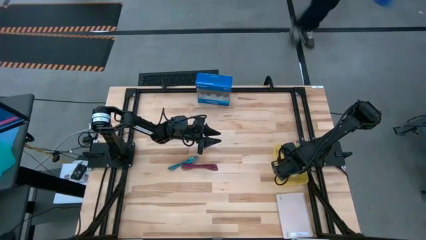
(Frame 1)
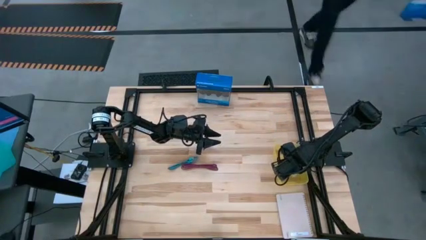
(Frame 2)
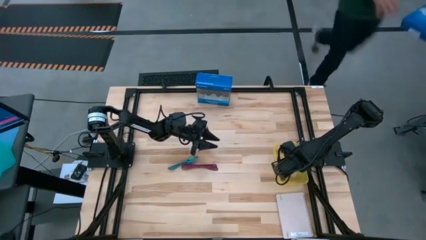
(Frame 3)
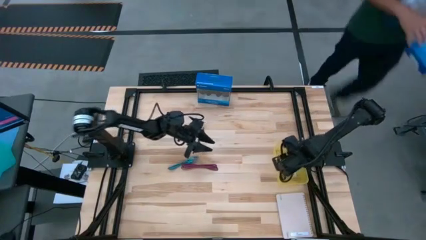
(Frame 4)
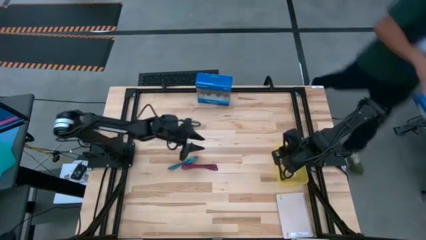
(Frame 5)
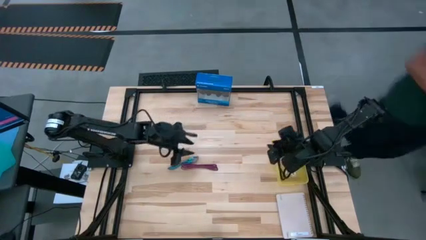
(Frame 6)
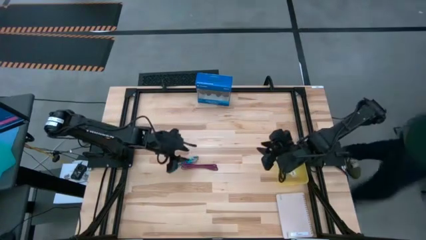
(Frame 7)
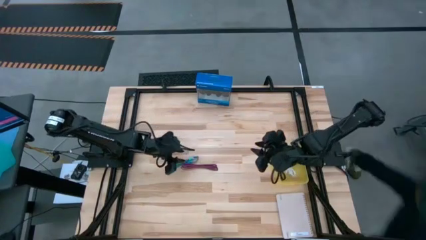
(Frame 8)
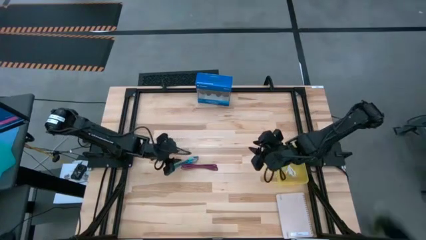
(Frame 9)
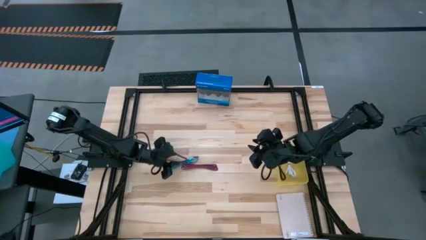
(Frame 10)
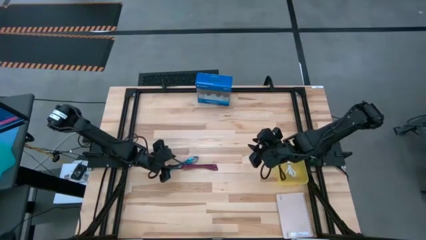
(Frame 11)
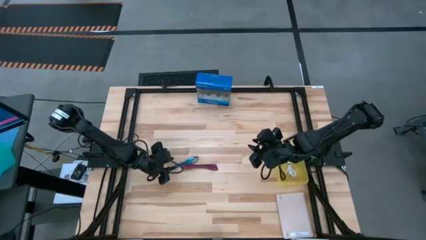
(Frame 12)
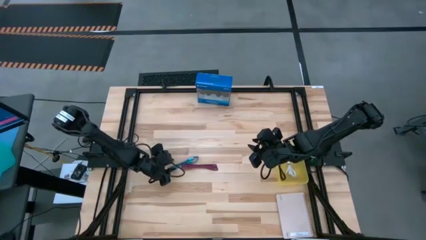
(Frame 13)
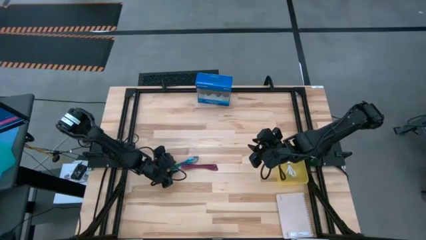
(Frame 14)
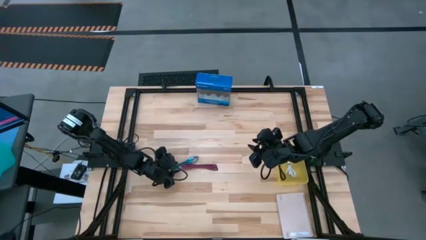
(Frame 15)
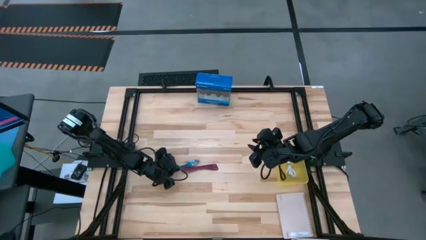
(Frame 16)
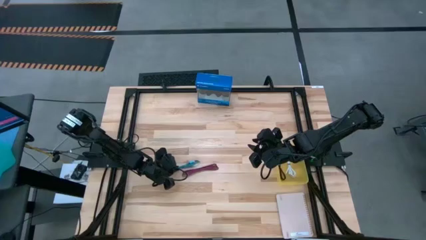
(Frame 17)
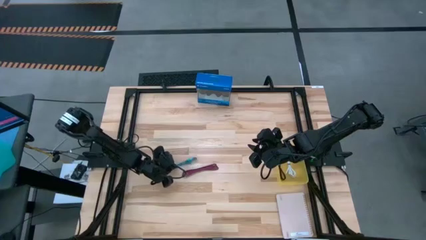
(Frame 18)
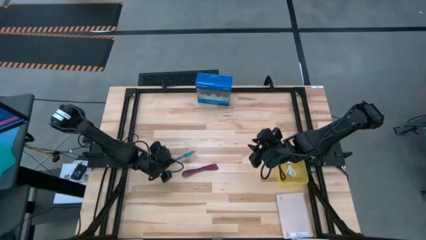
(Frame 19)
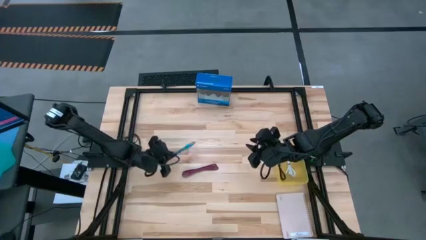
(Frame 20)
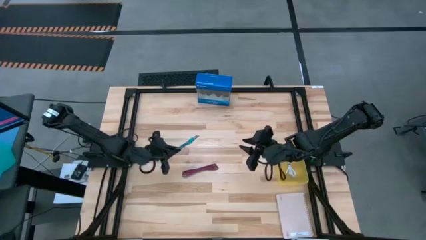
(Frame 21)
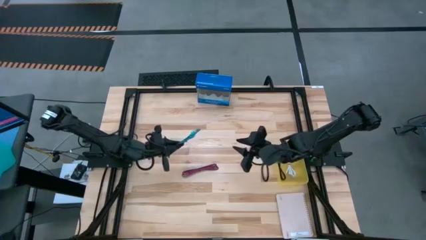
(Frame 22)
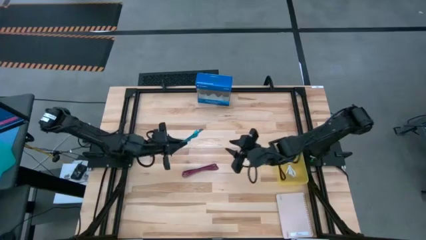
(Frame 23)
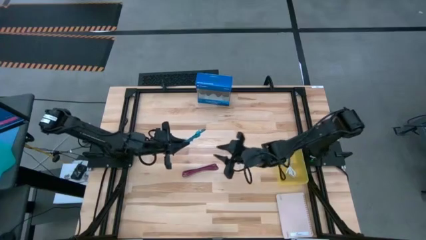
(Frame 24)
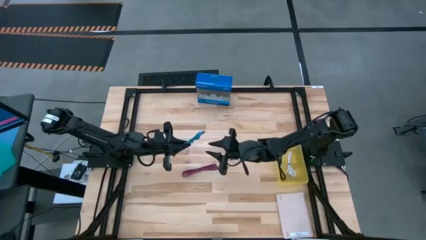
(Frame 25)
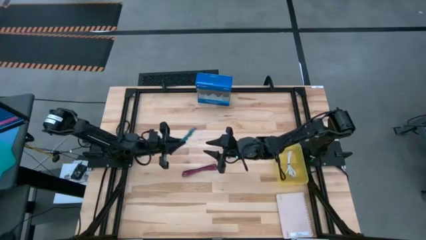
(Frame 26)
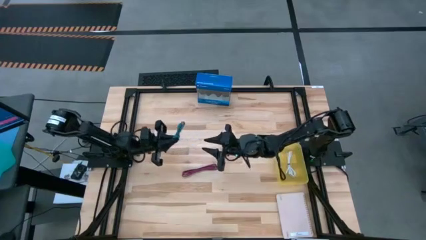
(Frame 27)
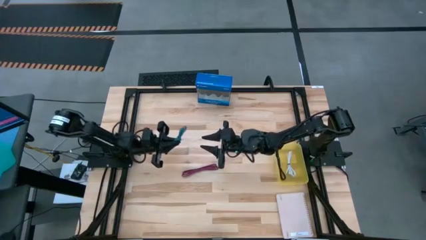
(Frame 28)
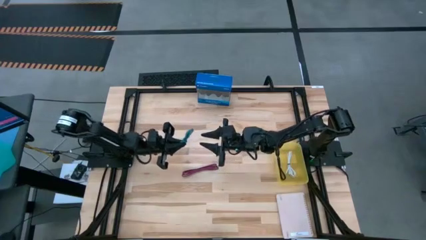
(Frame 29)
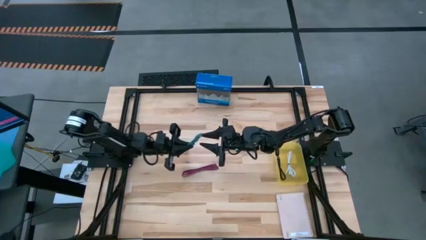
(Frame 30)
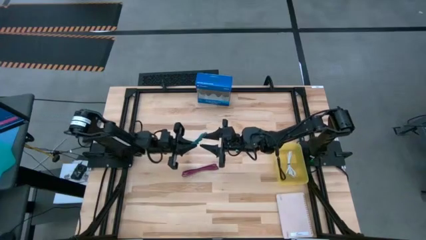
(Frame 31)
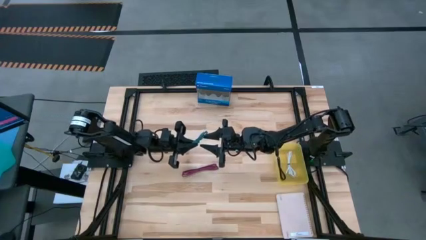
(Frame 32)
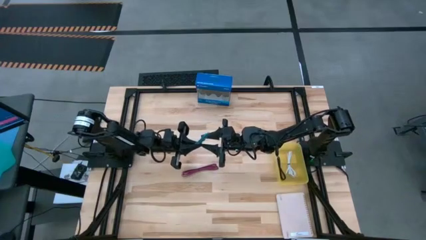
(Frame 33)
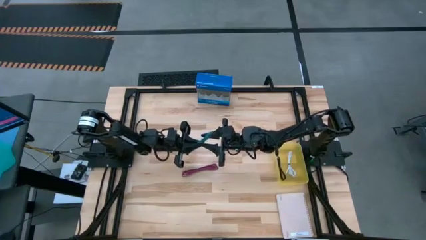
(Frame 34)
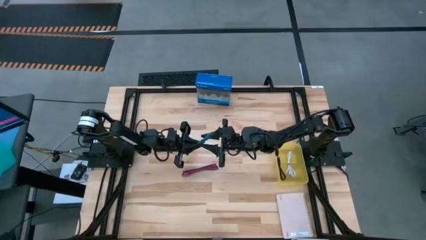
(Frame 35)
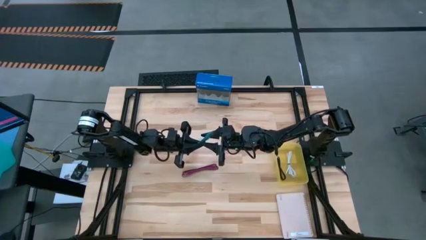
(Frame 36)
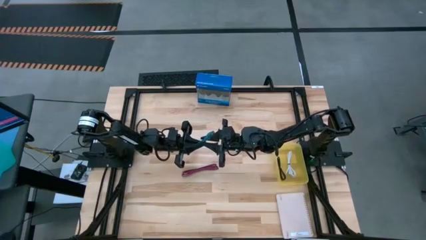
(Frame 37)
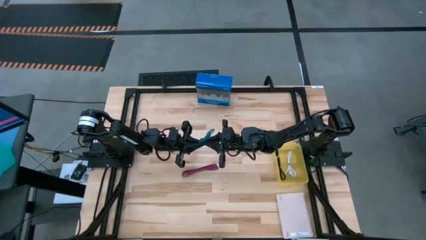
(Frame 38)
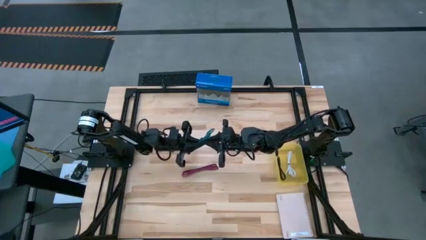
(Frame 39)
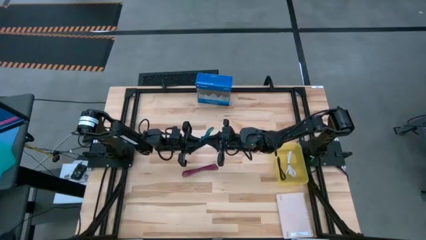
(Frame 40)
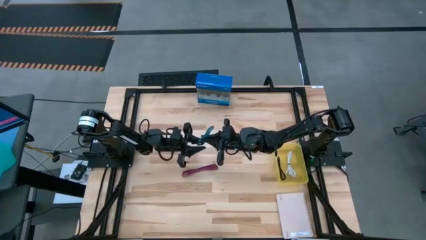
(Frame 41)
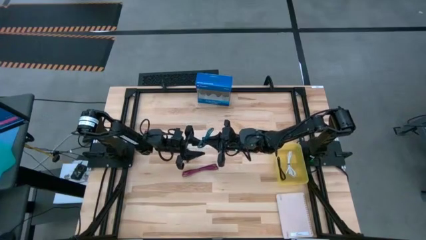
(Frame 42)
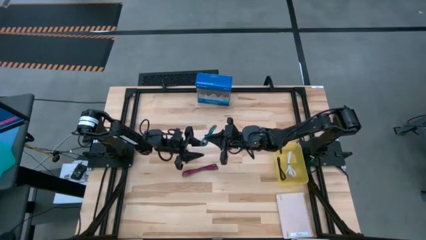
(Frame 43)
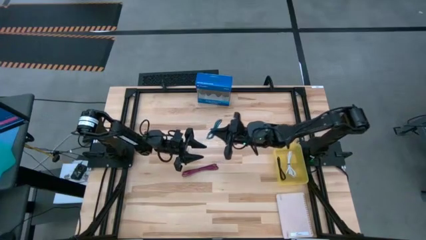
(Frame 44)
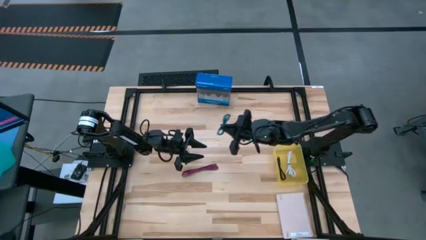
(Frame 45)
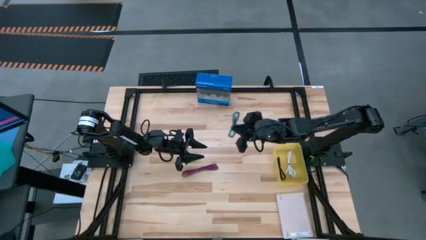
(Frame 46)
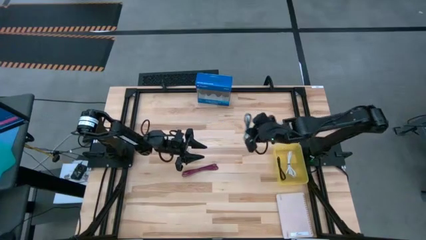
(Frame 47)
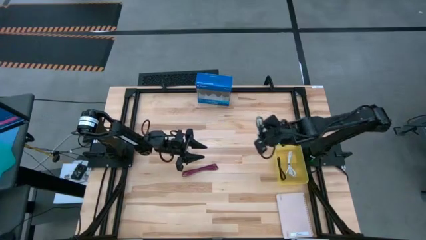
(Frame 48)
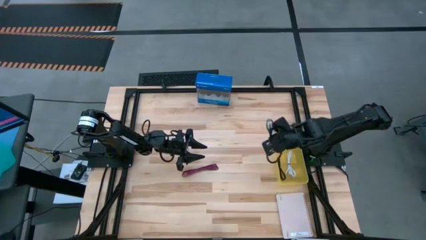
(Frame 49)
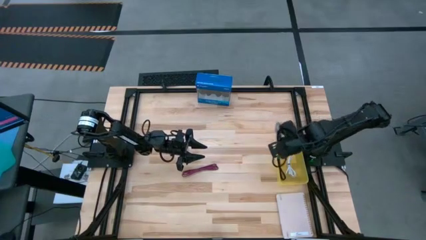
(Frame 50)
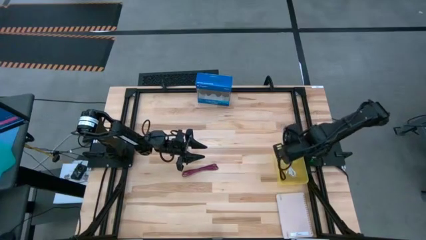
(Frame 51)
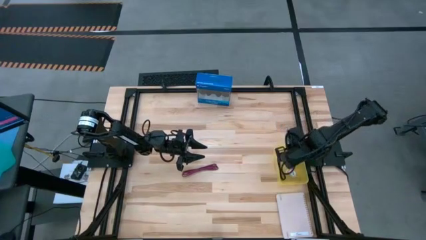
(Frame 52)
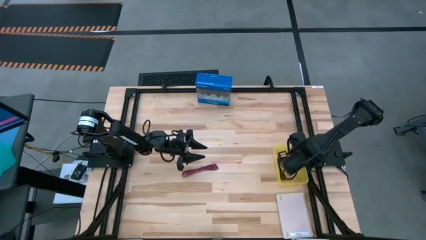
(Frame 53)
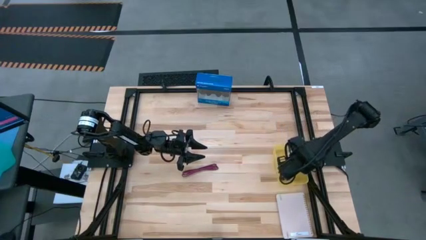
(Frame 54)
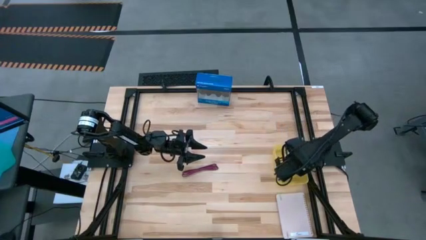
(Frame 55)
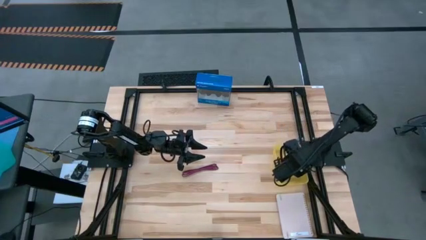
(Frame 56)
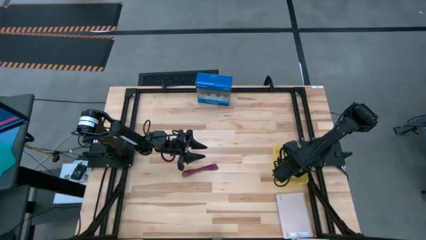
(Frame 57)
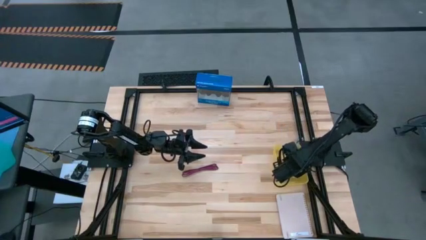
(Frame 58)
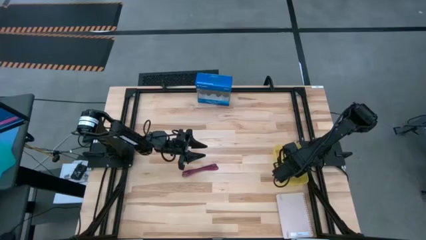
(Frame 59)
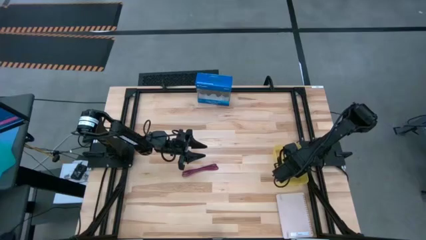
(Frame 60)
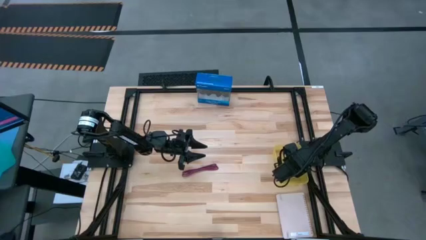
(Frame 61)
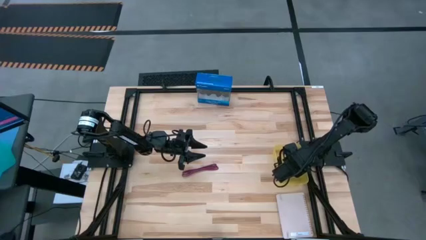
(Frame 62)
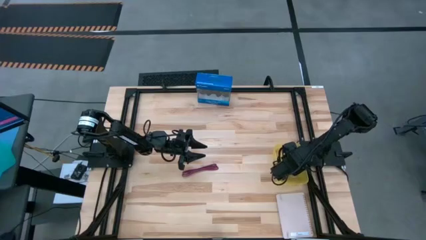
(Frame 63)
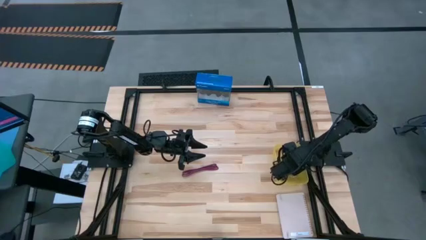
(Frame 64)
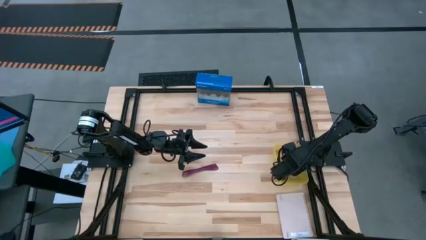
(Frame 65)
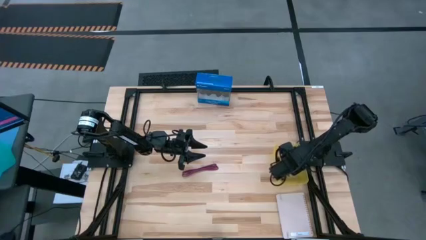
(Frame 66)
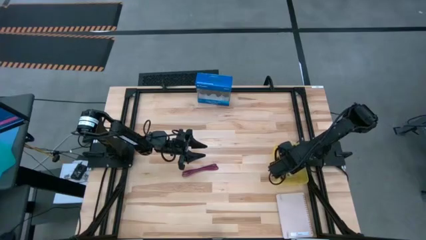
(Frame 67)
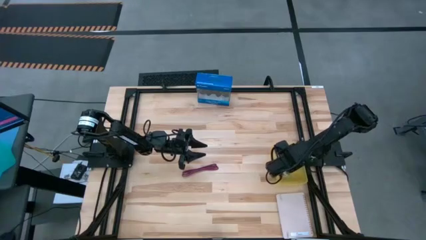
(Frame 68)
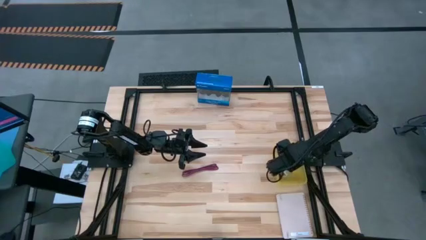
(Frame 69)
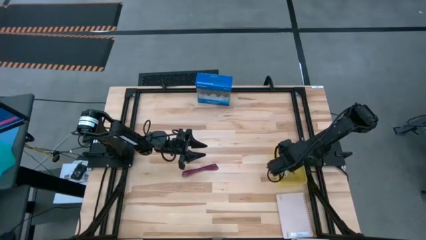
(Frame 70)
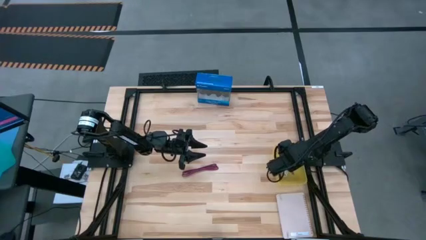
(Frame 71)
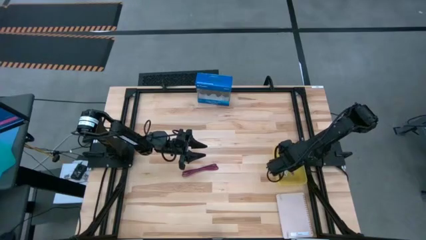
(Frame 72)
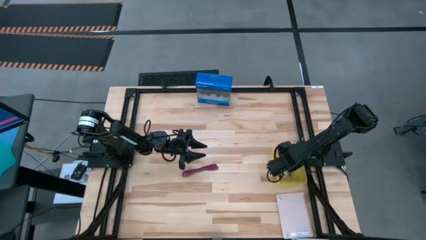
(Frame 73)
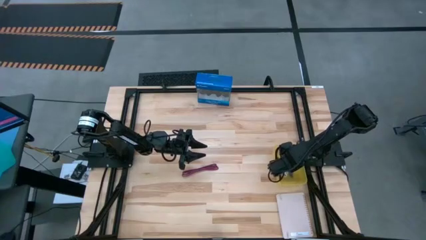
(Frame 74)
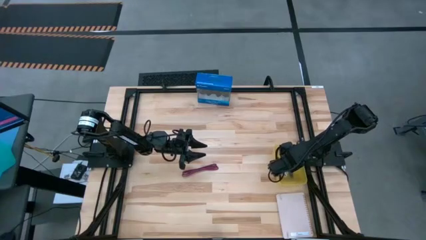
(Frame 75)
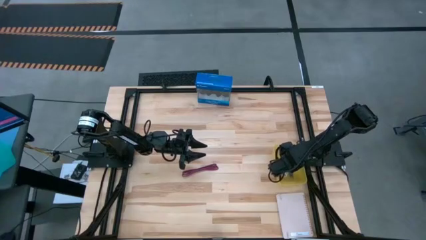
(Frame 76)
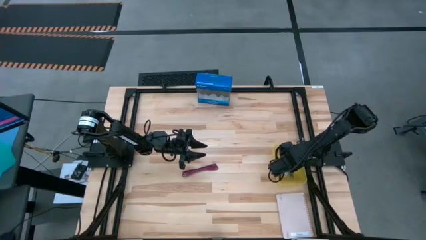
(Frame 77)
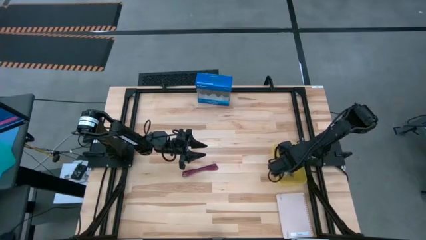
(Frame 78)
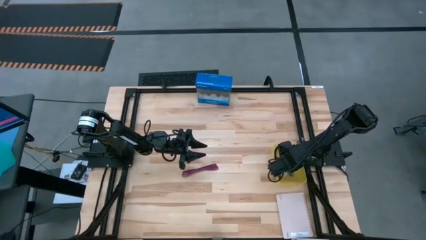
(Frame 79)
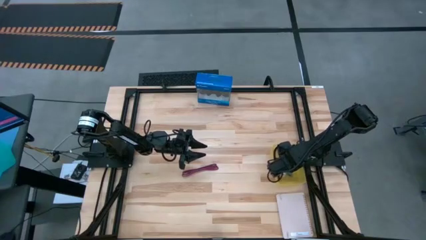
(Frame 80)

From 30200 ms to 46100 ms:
Task: Pick and place USB-C Cables
Put the blue charger cable into the yellow bin
